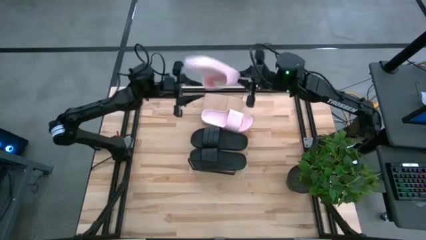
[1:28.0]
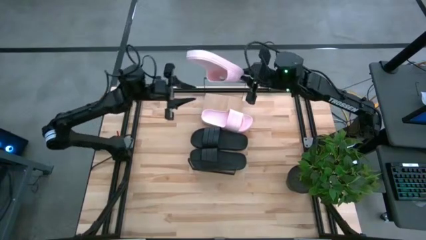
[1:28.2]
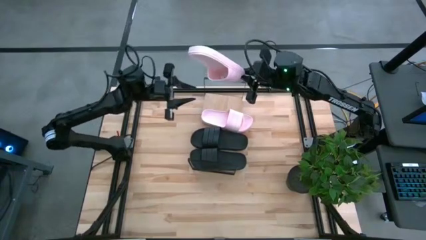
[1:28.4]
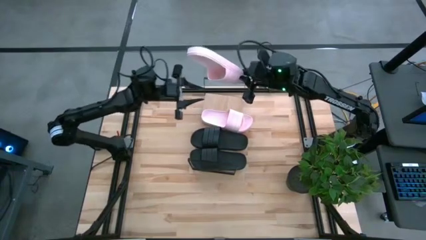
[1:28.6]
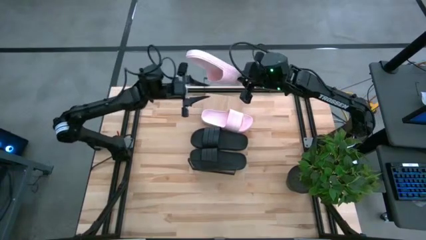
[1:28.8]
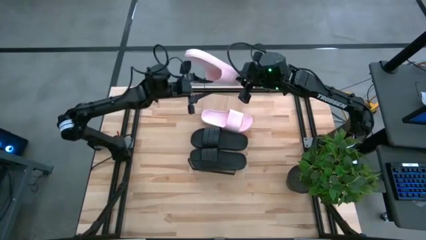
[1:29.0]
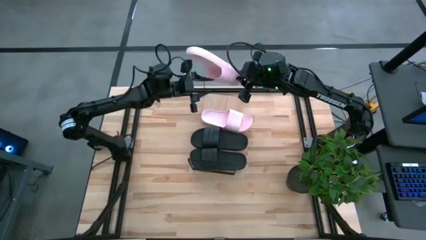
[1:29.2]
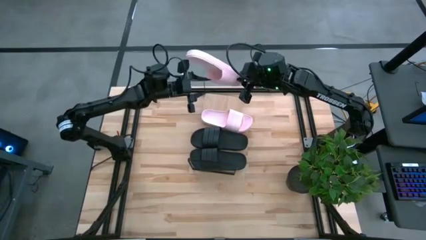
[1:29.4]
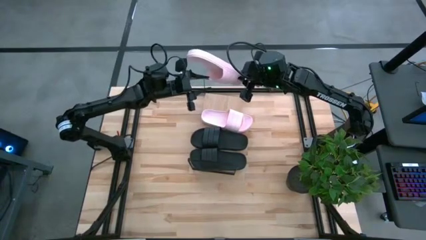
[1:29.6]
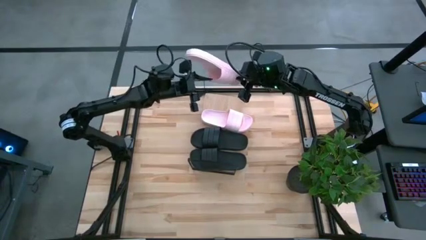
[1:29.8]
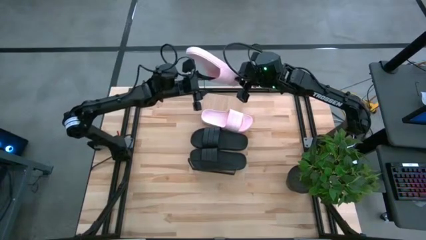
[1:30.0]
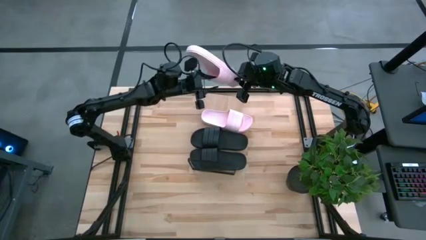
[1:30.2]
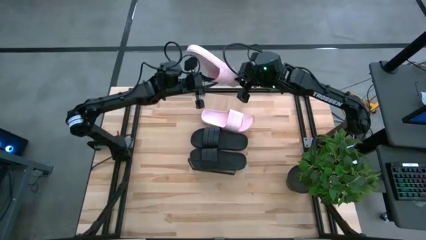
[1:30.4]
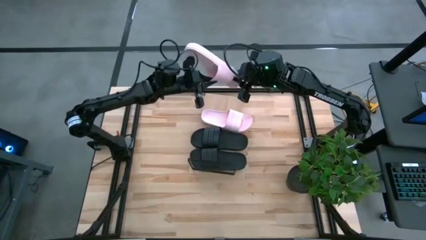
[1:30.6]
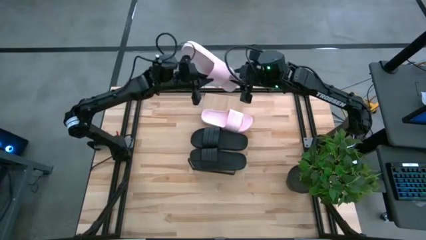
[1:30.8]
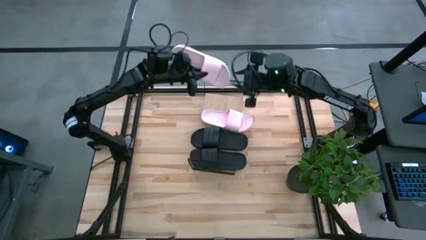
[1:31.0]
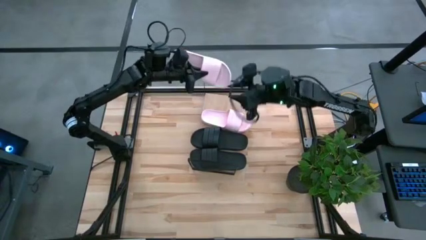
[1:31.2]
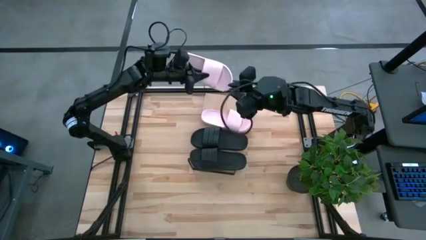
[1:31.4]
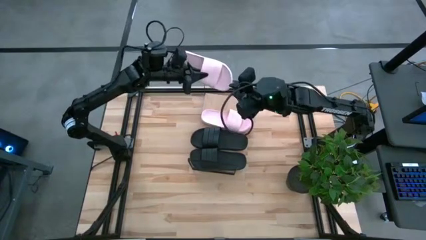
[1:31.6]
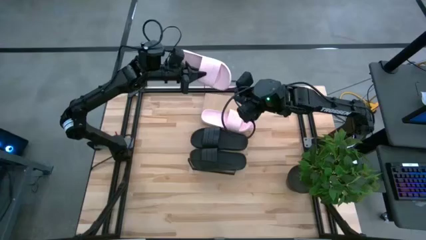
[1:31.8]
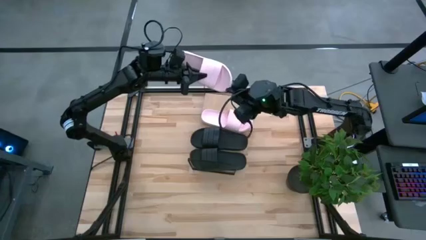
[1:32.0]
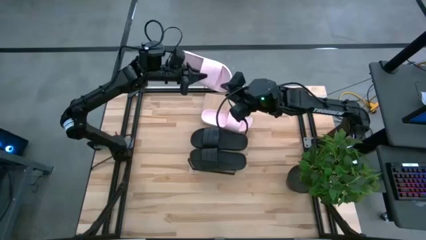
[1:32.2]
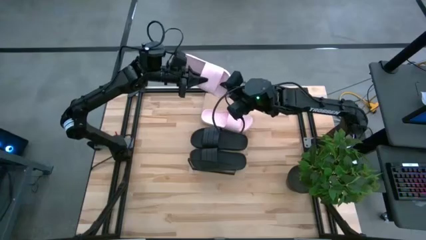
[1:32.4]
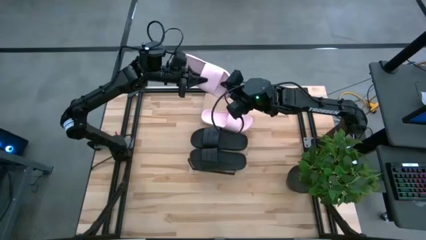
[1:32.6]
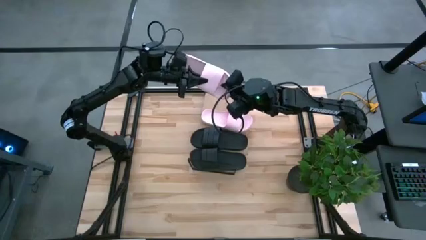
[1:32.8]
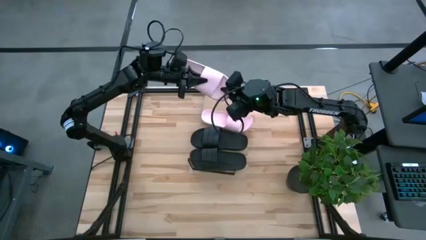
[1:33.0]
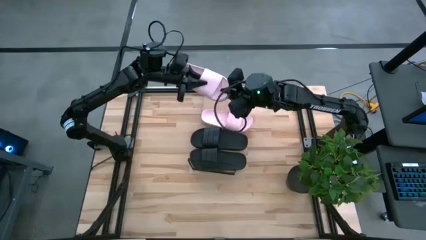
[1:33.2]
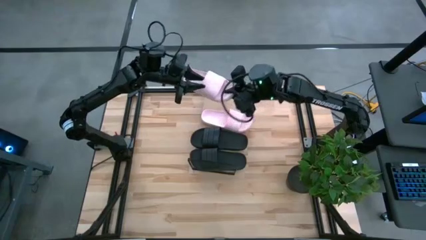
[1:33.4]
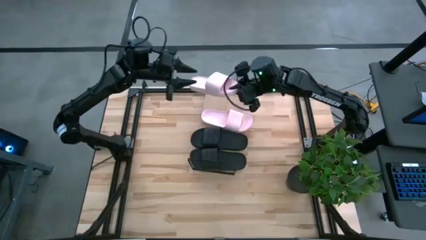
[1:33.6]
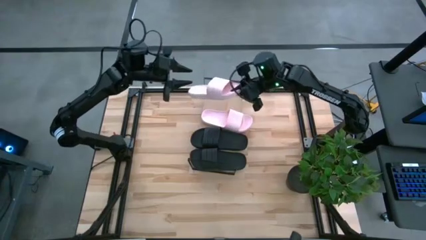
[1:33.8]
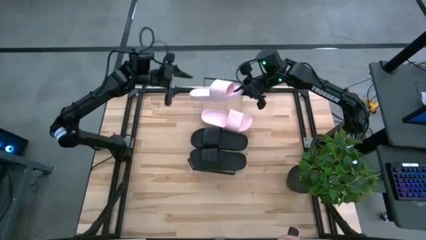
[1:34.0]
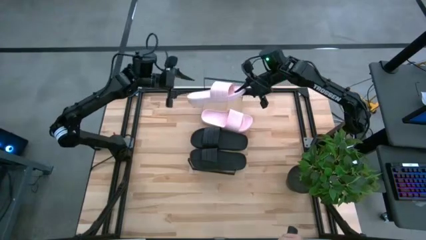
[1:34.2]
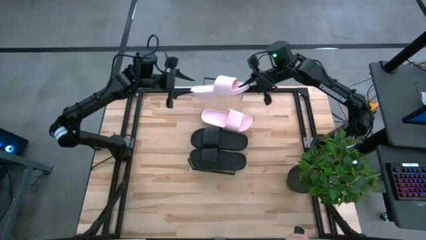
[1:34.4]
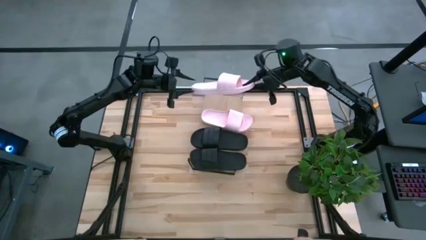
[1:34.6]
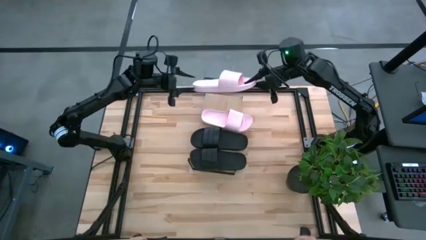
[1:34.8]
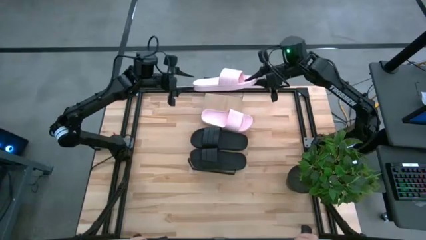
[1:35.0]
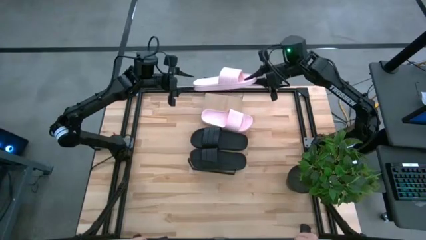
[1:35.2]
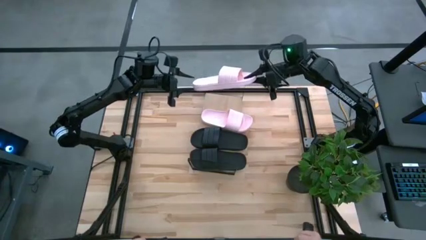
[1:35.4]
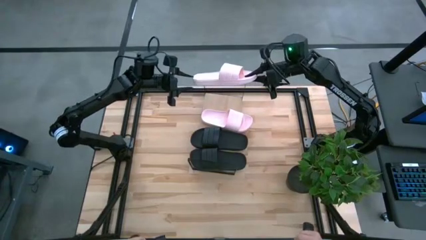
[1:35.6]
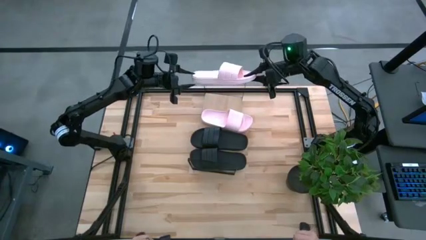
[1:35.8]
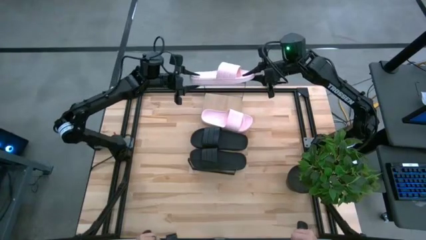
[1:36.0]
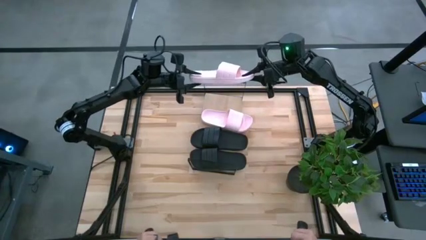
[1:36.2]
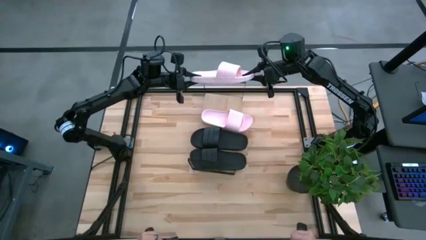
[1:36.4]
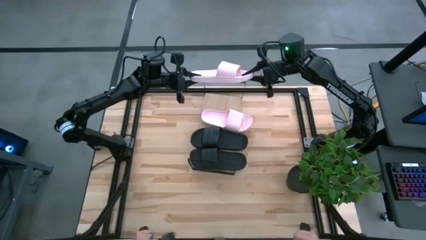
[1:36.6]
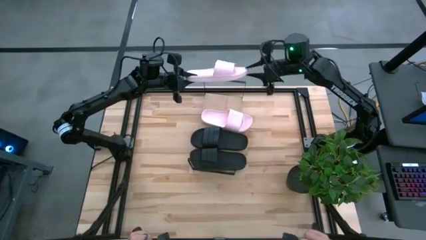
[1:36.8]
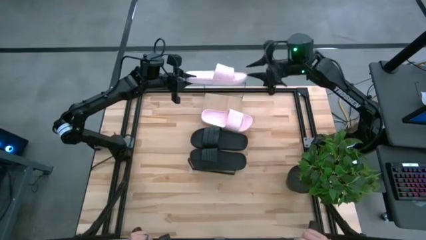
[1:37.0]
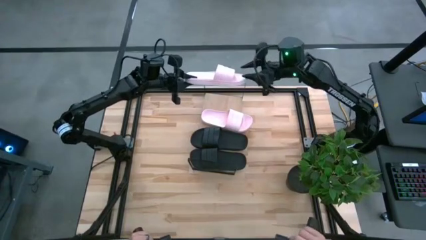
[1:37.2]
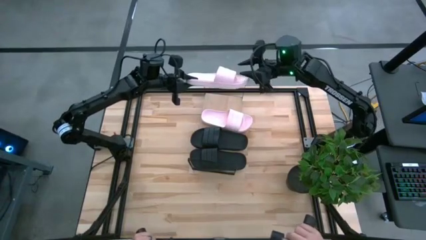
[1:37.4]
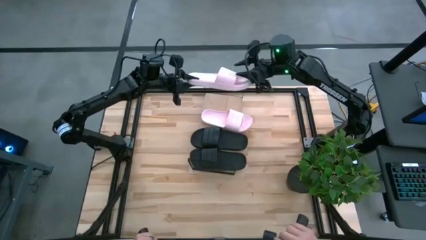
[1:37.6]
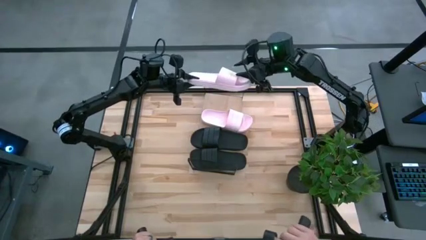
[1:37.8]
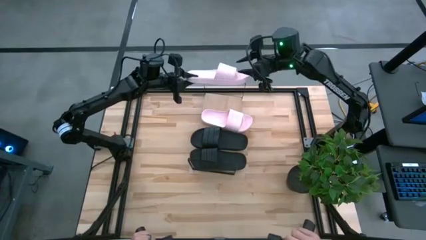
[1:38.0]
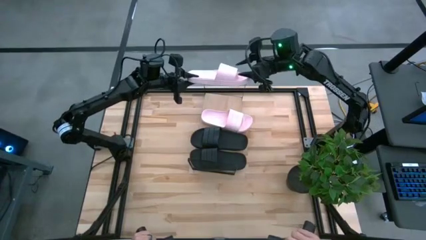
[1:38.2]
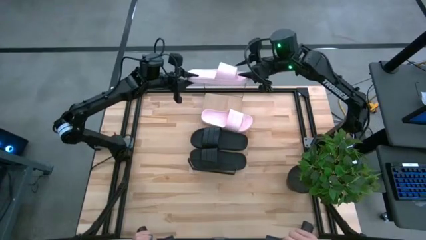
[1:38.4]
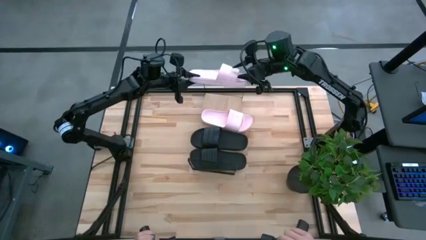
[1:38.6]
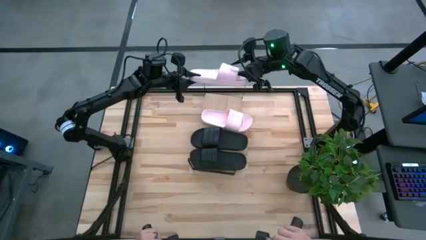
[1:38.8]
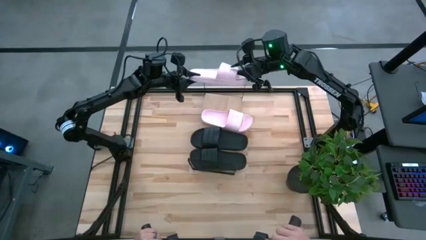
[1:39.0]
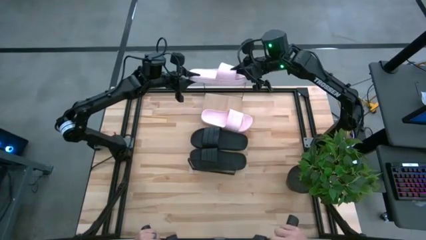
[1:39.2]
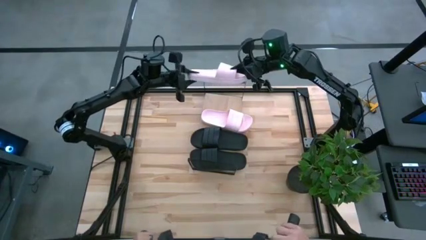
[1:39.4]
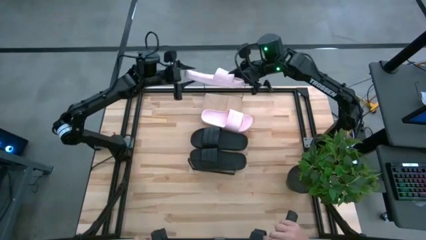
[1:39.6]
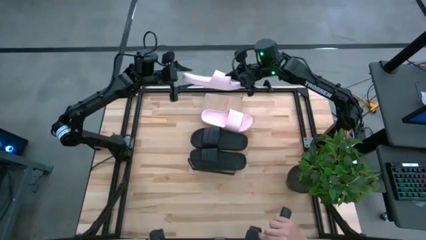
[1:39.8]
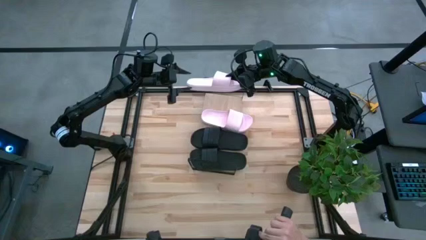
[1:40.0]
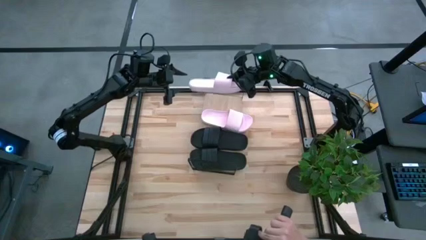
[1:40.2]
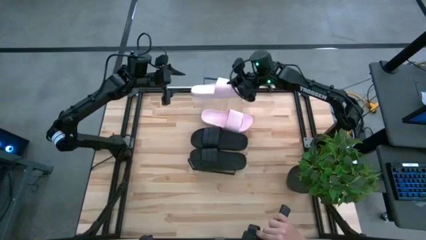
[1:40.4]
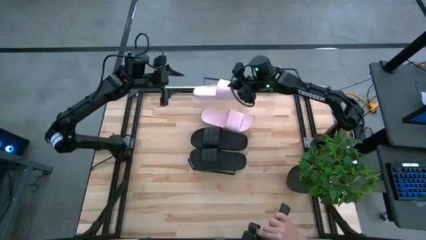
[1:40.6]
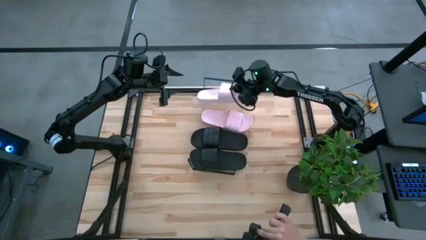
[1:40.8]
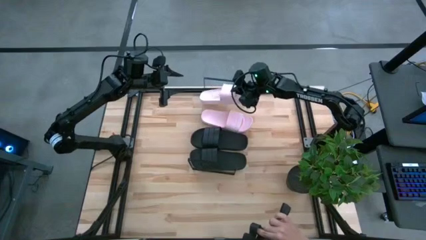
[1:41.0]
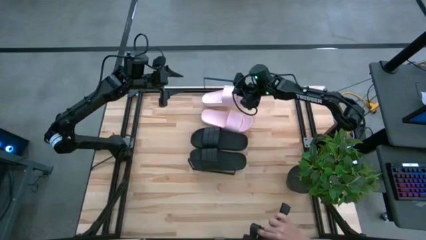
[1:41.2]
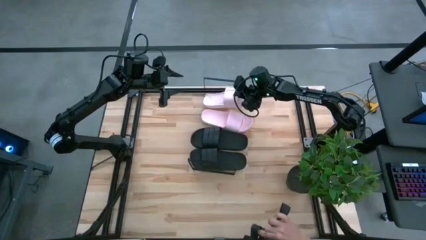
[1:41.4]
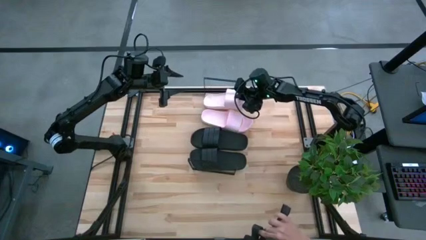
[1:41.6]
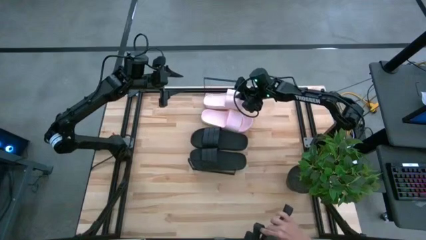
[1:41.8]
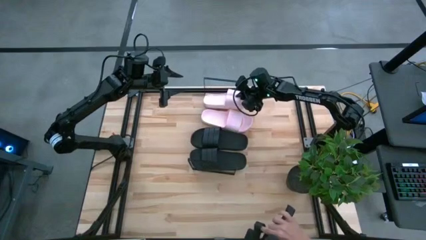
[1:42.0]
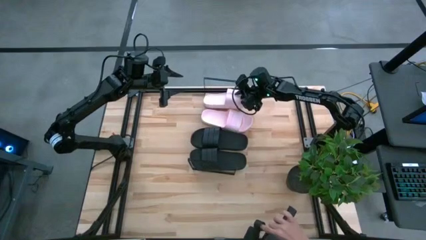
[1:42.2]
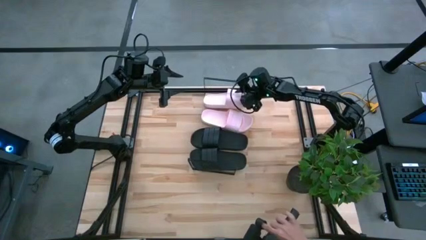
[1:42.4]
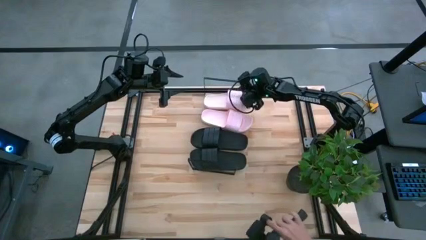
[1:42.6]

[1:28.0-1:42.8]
Task: Pick and place slides into the shelf
Put the pink slides on the shelf
